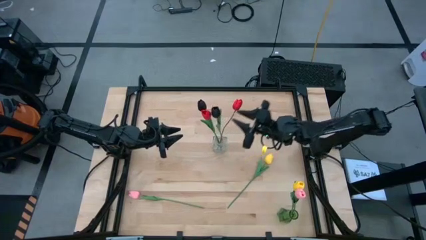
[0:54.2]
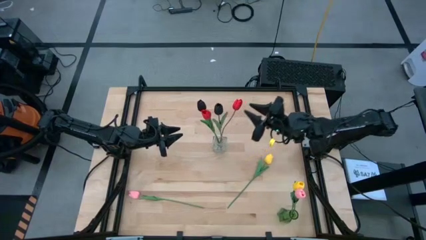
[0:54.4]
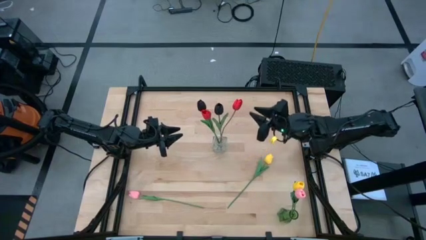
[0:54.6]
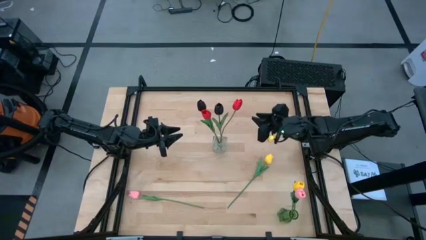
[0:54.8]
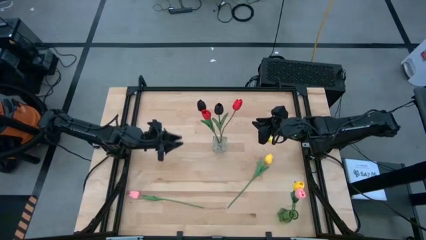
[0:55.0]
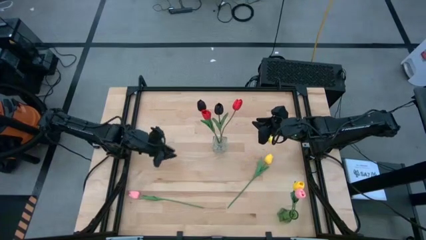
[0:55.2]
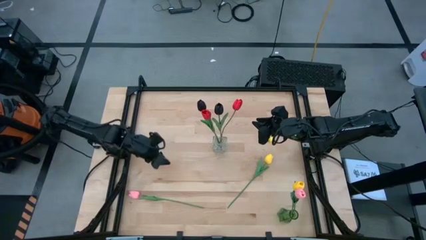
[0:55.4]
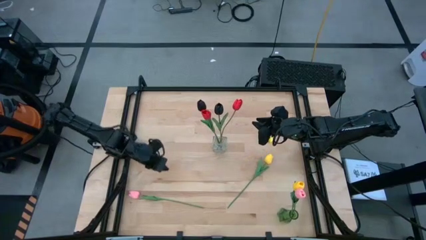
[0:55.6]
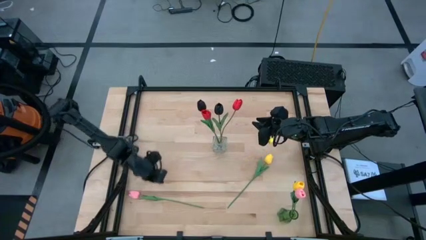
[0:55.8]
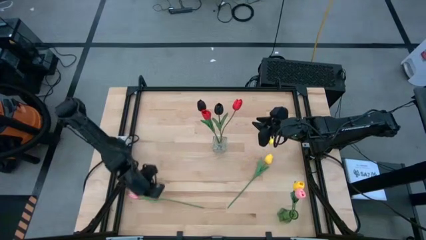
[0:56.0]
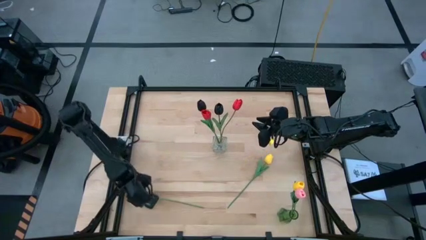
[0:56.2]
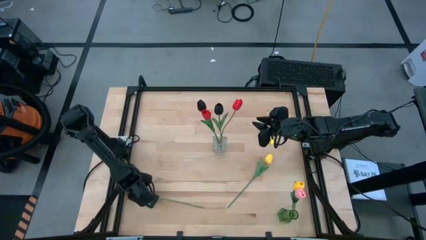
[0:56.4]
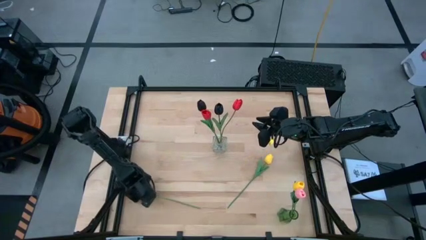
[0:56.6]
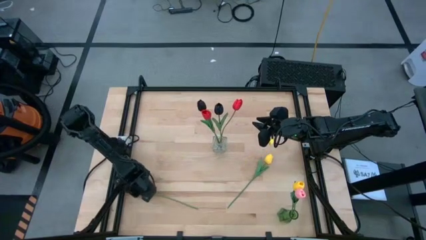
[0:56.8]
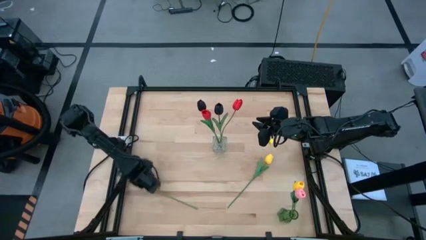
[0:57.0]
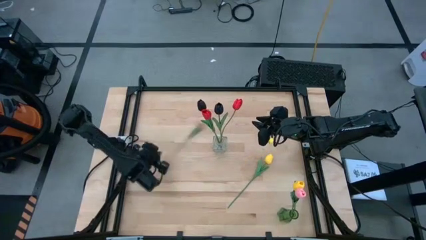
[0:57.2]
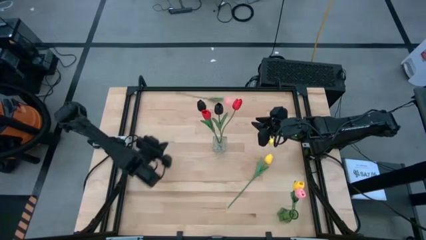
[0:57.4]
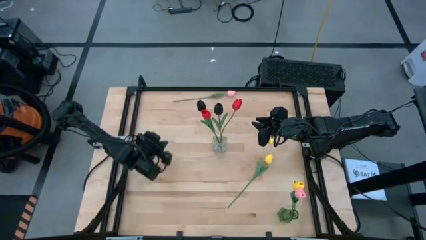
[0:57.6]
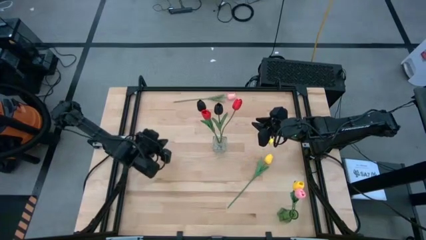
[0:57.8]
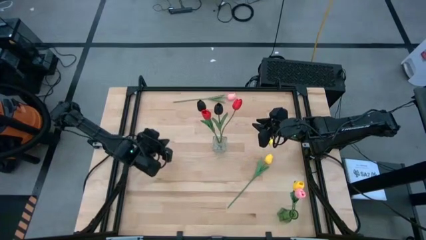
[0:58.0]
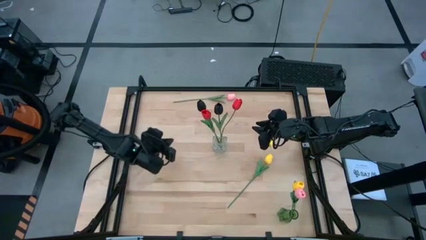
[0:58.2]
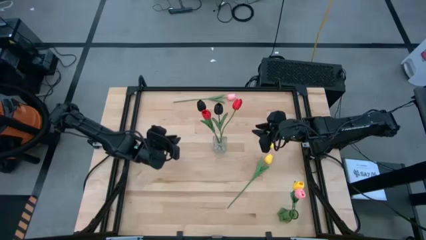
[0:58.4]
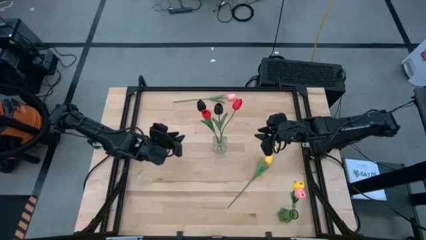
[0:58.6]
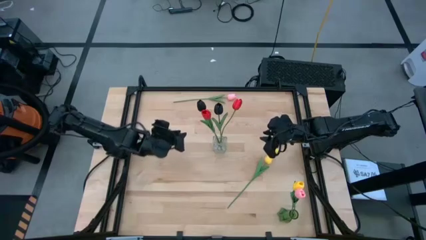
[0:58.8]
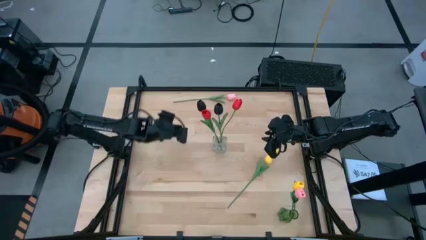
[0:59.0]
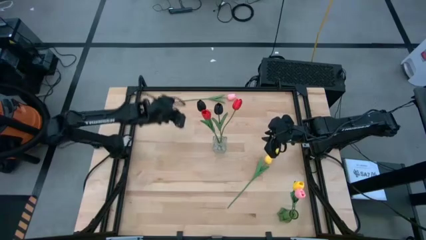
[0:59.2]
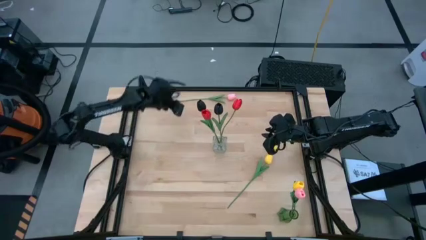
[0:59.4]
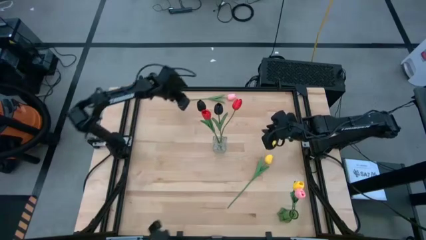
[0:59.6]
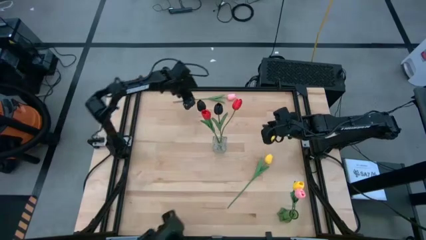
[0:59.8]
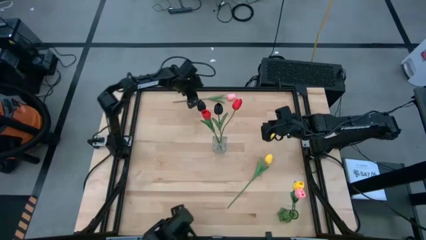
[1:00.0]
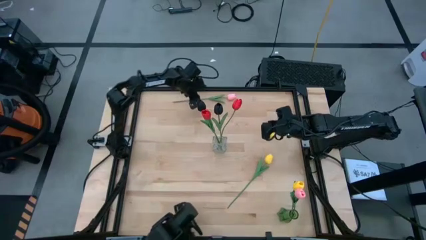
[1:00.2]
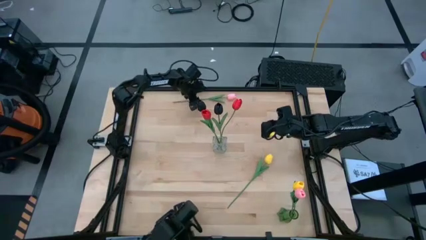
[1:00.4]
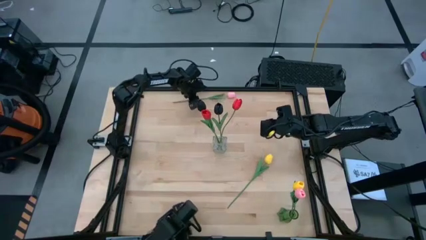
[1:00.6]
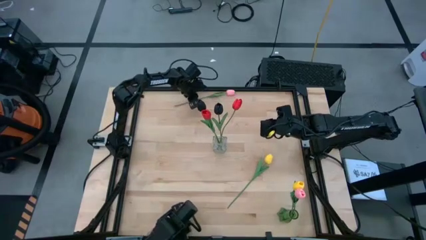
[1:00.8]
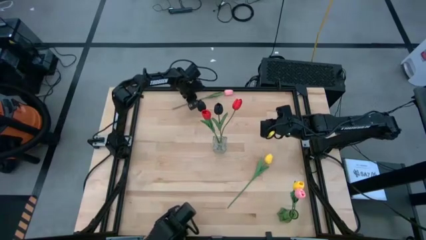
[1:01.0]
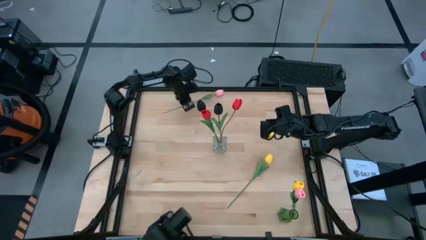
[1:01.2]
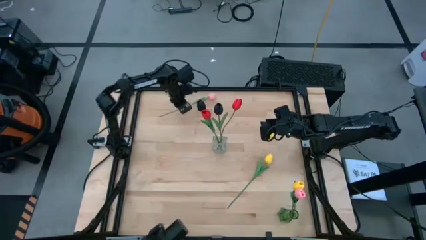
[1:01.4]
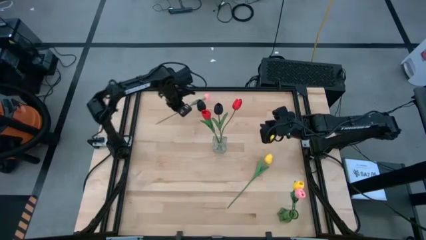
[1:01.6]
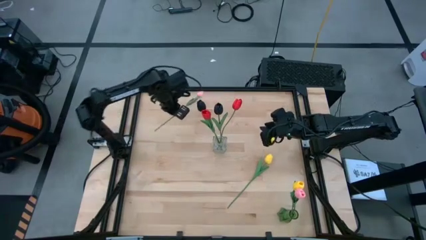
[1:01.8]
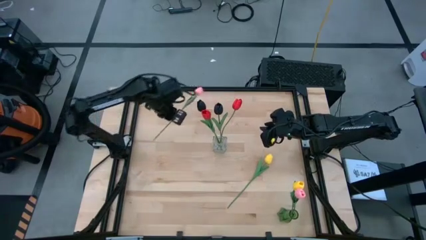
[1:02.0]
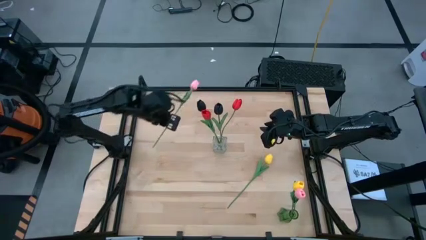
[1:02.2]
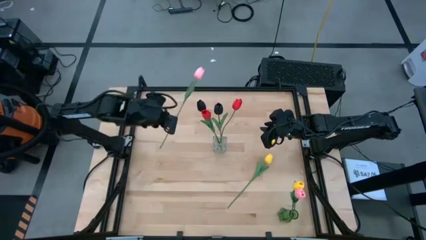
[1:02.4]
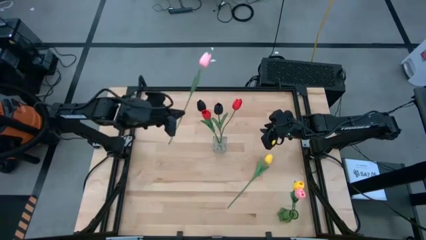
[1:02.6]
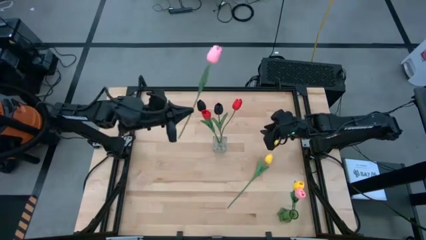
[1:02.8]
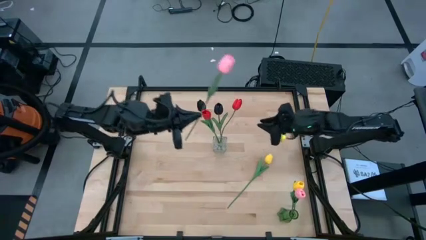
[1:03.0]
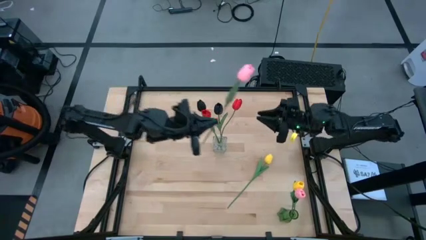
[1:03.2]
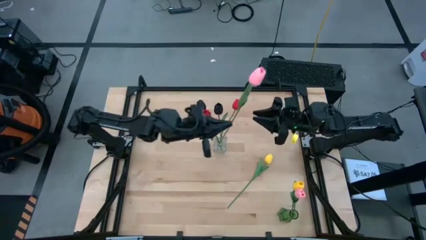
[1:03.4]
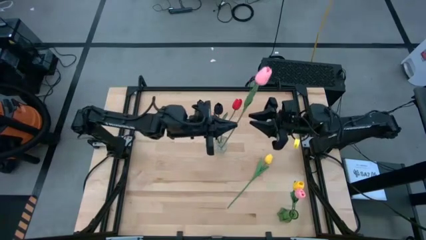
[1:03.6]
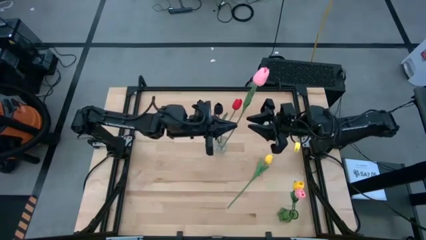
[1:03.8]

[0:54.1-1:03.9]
Task: Sort flowers into vase by color
Put the pink flower into the green vase

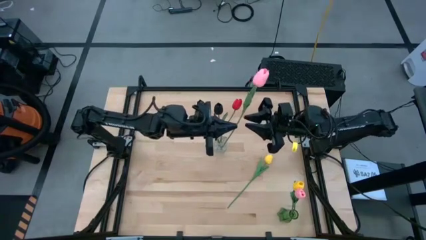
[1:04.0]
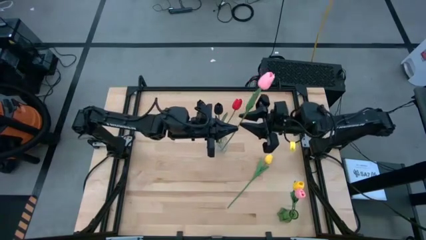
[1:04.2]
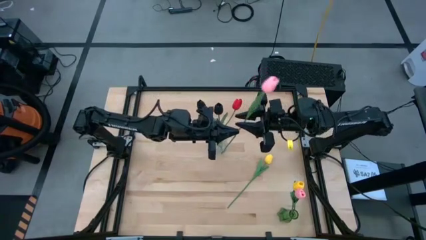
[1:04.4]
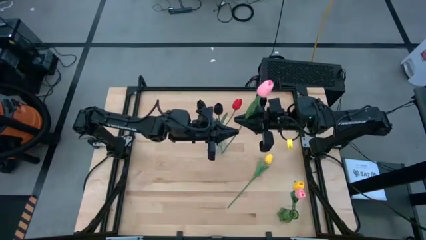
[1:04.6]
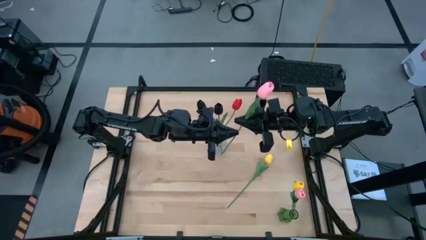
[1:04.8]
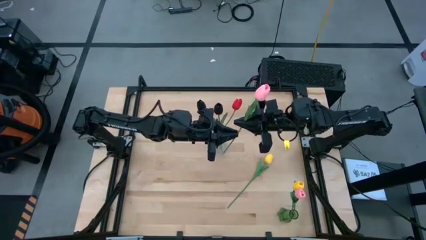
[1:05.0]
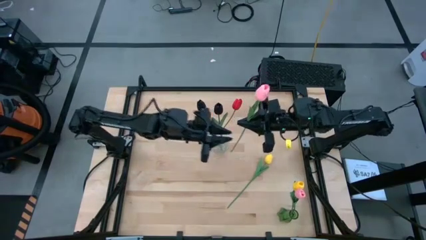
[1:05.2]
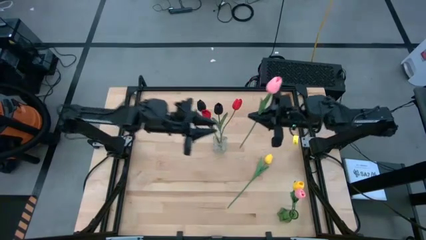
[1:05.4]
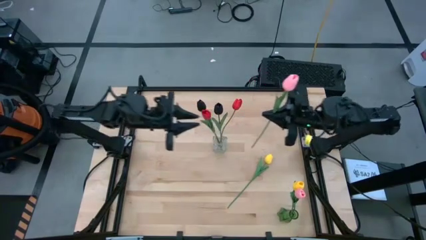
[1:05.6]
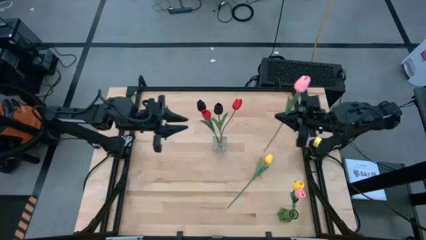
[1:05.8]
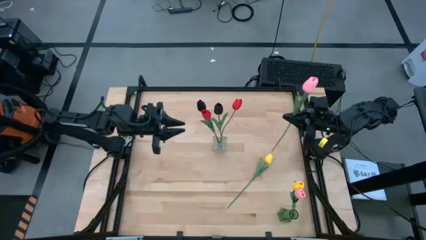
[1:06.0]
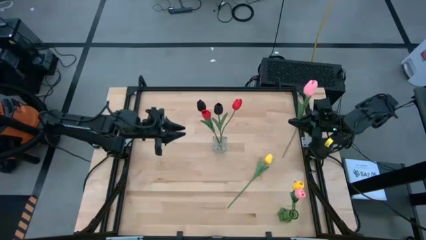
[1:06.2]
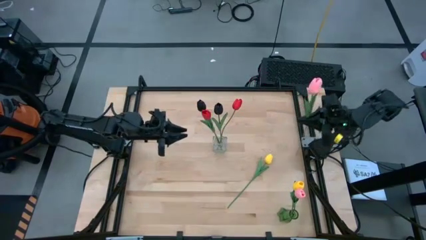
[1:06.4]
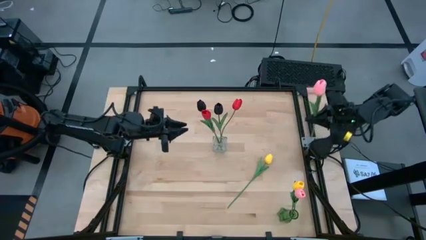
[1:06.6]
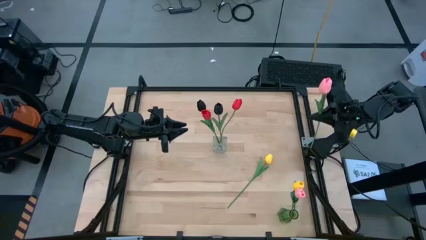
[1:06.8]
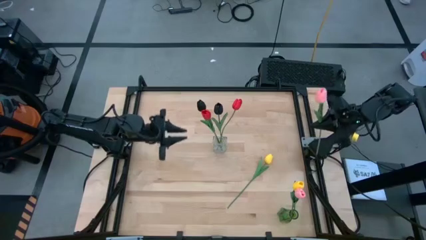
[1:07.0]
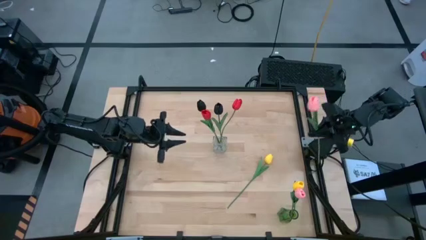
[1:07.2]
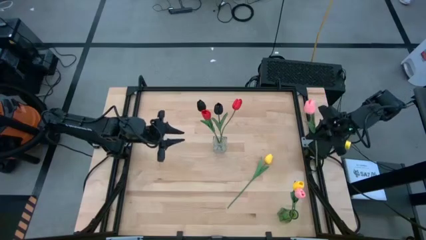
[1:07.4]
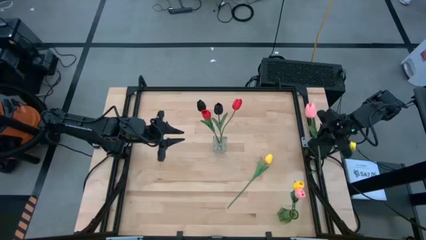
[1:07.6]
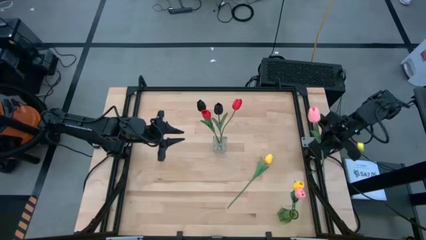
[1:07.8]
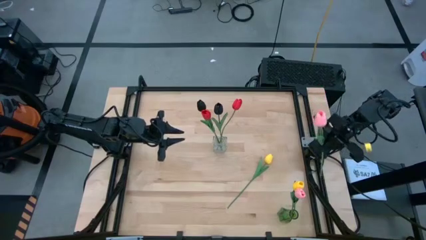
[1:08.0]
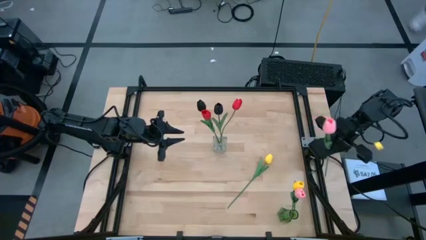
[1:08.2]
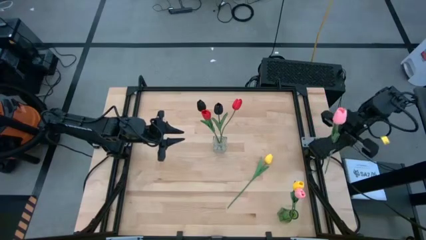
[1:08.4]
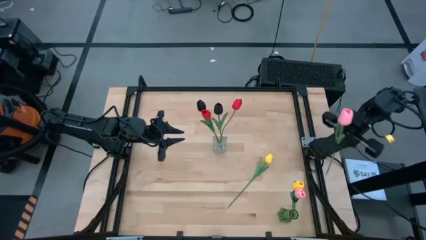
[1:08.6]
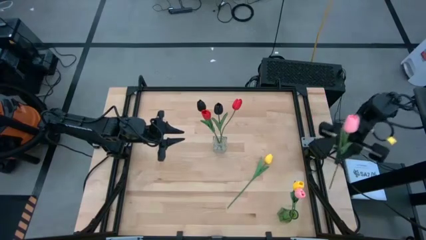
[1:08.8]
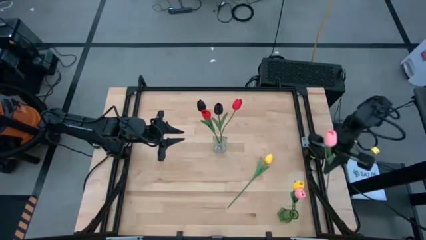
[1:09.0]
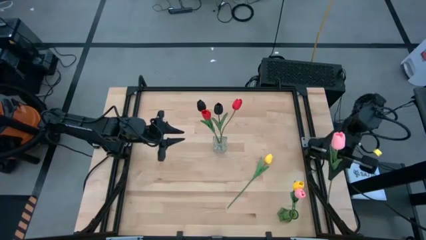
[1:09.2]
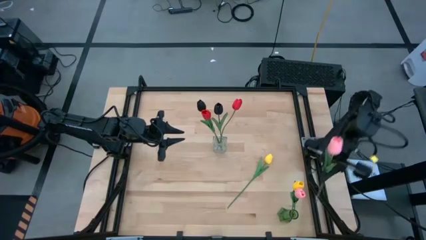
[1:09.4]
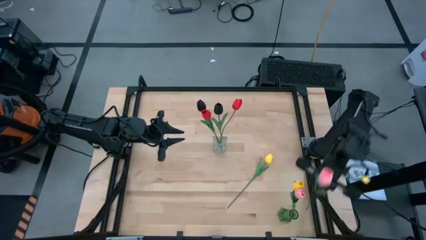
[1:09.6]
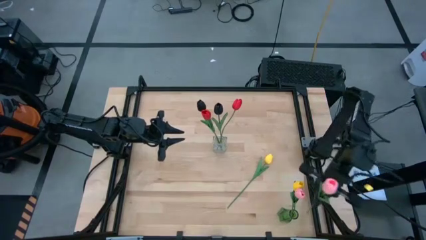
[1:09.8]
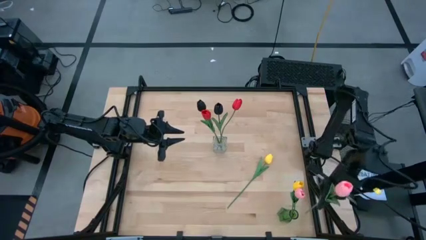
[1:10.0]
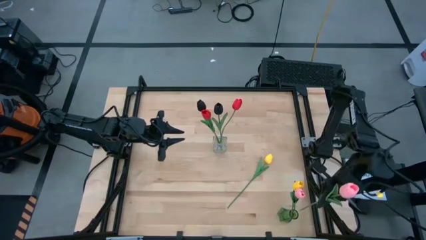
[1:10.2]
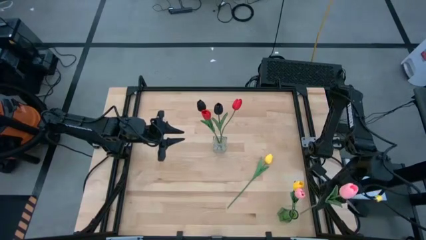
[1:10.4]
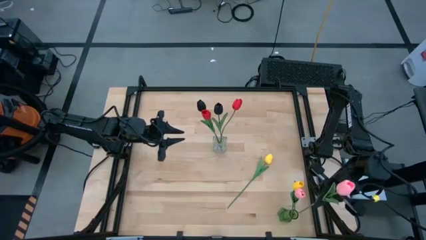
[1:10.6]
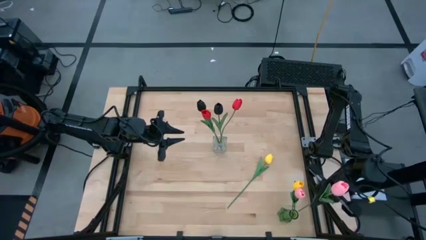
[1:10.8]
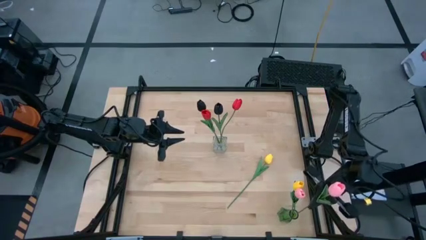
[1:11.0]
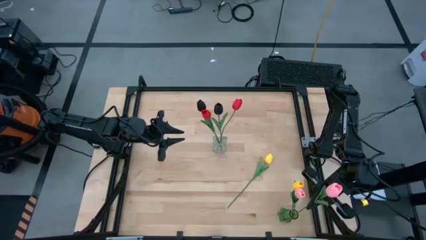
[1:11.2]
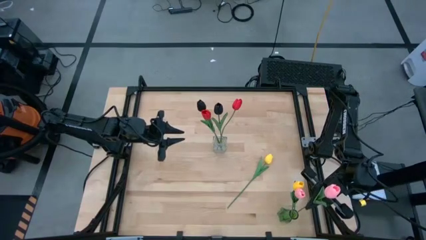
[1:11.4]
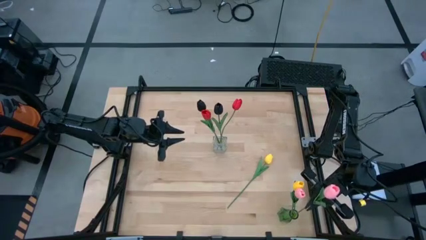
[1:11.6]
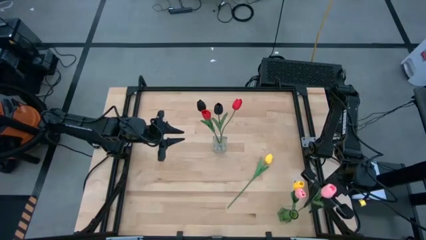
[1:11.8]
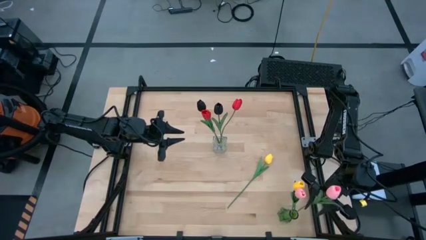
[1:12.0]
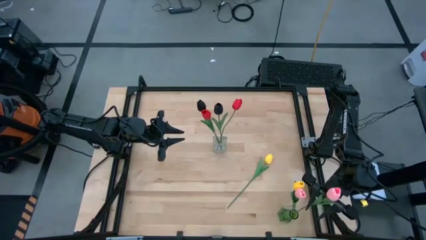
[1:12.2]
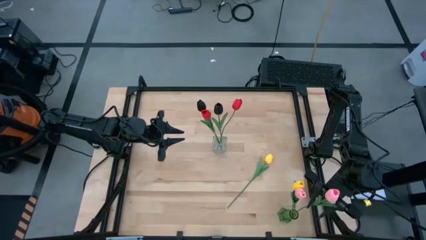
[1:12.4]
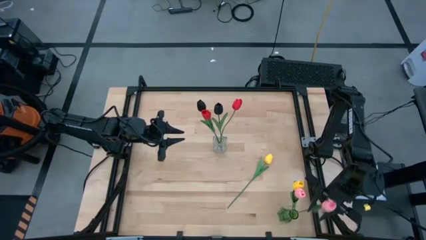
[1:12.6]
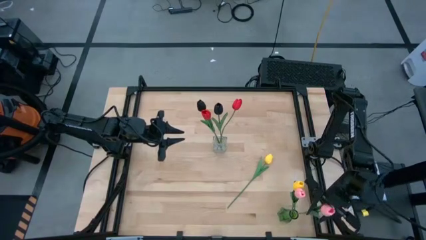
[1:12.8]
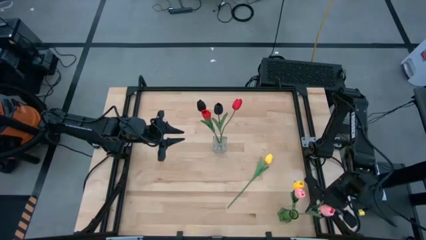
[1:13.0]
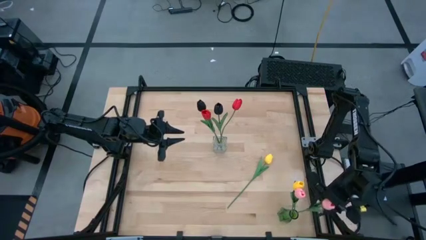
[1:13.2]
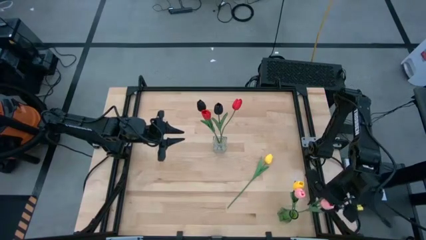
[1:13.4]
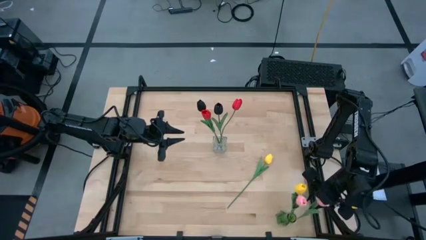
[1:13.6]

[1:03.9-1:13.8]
Put the pink flower into the green vase
